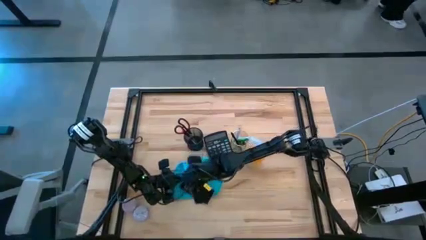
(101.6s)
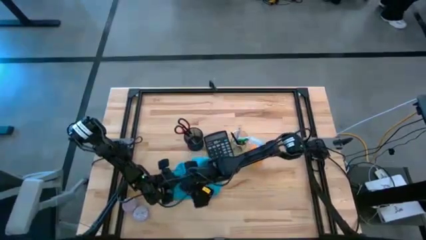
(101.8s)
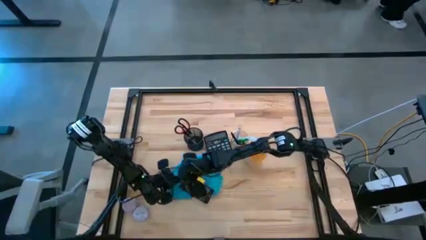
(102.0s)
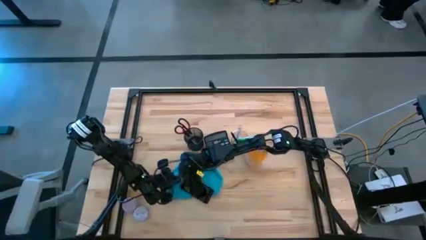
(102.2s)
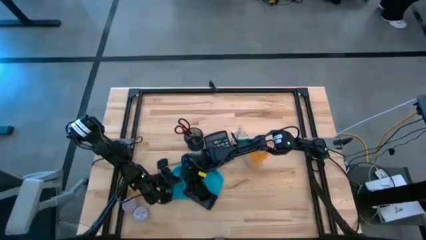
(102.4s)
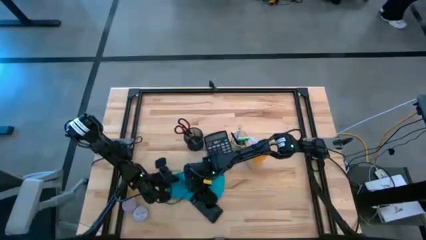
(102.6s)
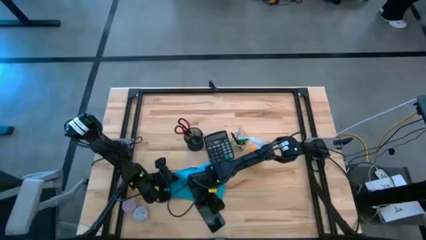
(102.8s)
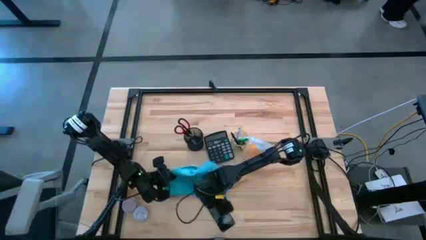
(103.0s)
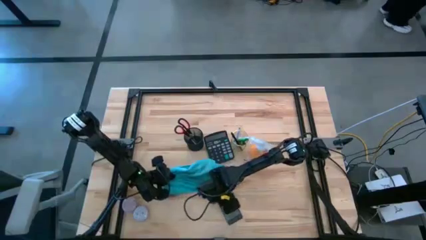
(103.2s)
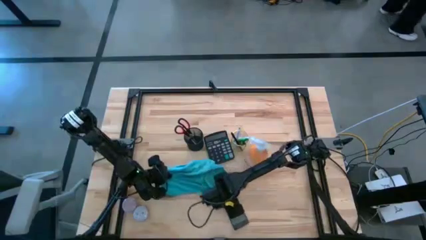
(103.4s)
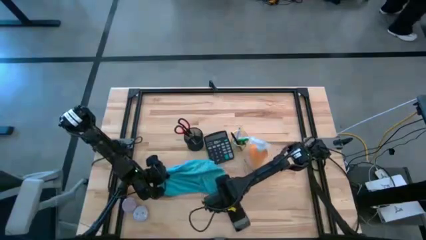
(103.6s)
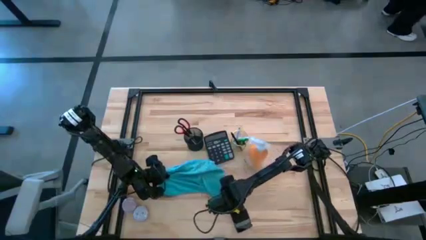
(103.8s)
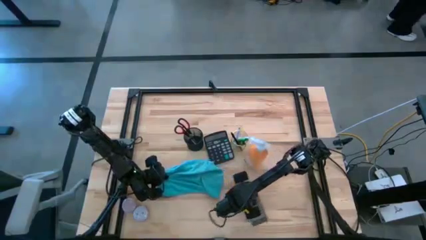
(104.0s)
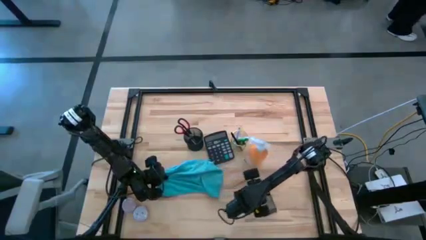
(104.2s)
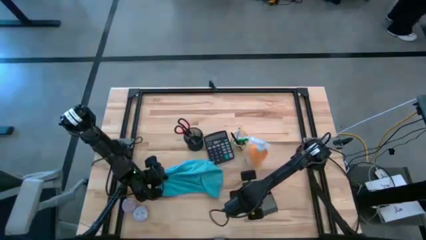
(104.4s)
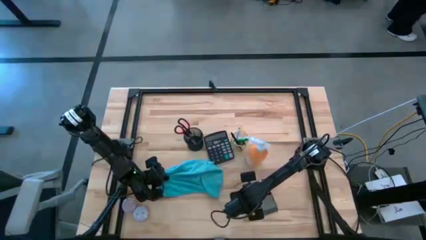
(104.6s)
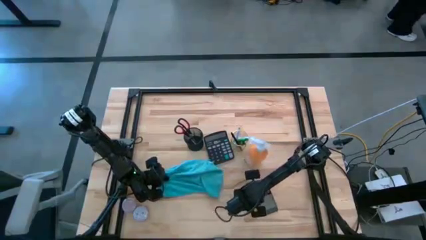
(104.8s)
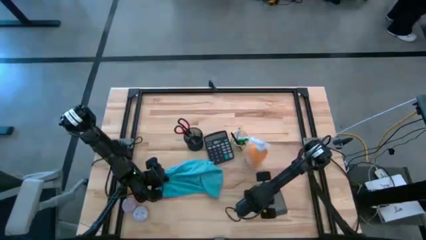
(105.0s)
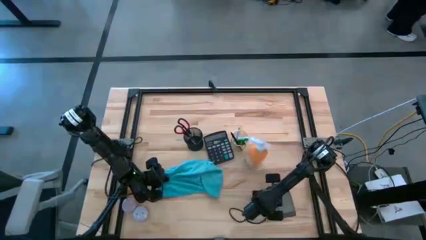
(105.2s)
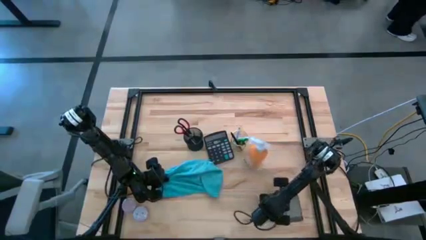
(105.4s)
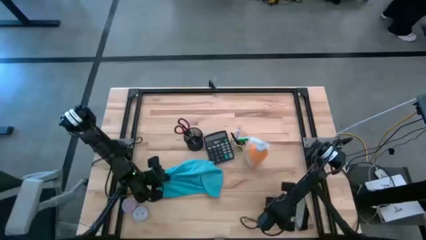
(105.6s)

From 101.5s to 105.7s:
Task: Apply microfiber cloth
Move the cellphone to the bottom right

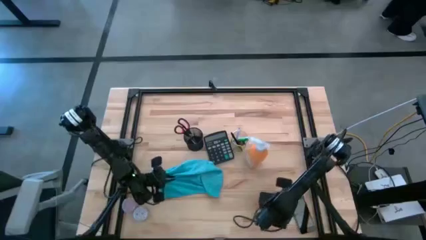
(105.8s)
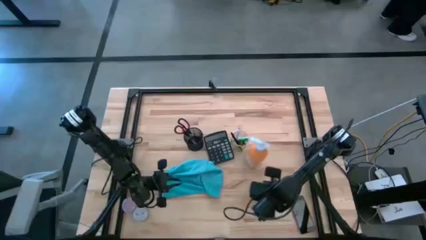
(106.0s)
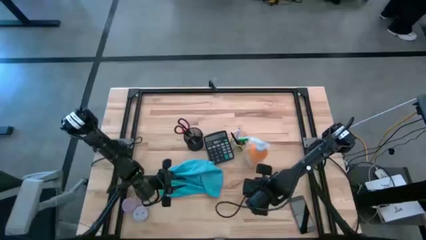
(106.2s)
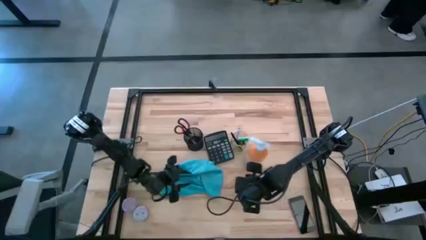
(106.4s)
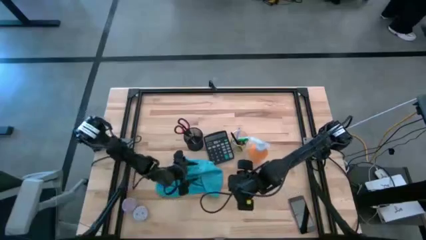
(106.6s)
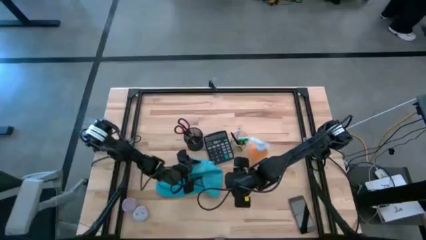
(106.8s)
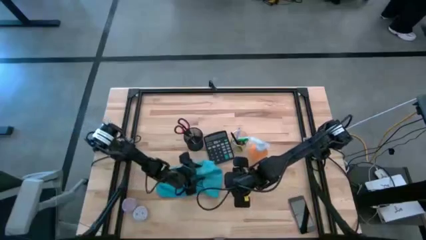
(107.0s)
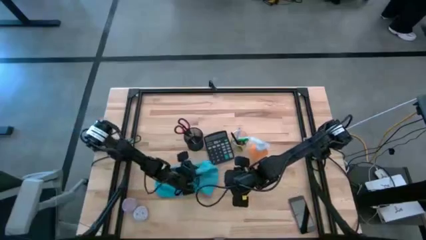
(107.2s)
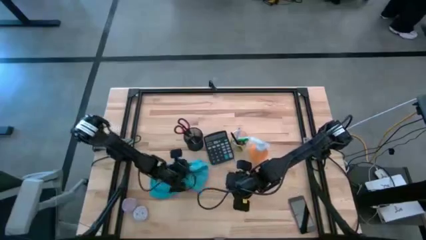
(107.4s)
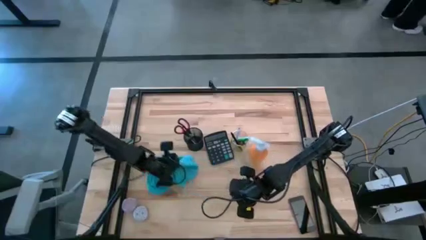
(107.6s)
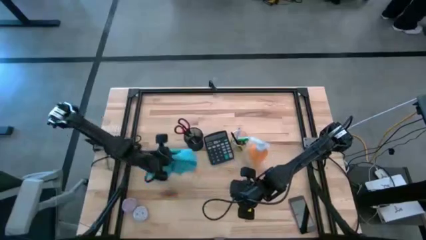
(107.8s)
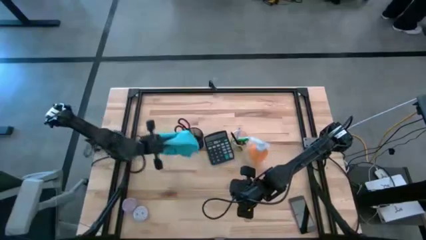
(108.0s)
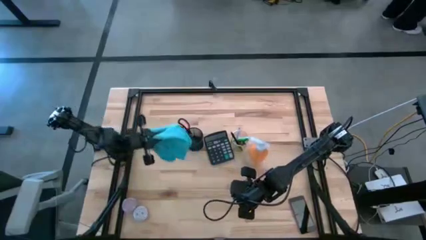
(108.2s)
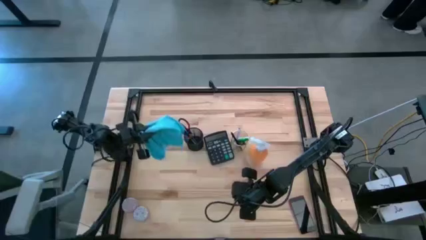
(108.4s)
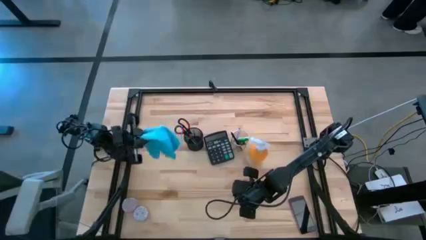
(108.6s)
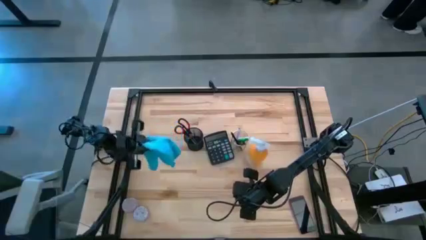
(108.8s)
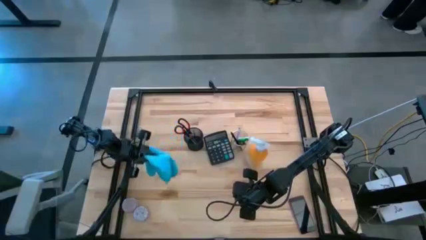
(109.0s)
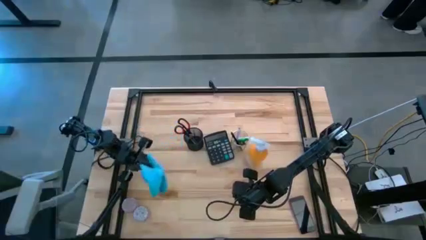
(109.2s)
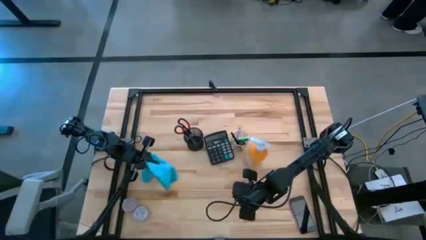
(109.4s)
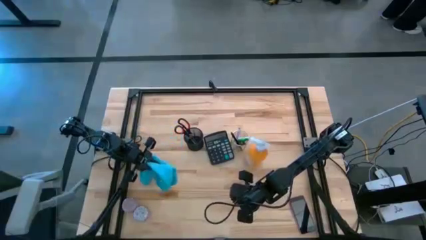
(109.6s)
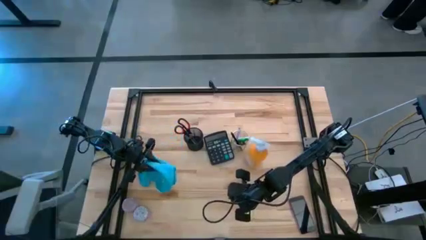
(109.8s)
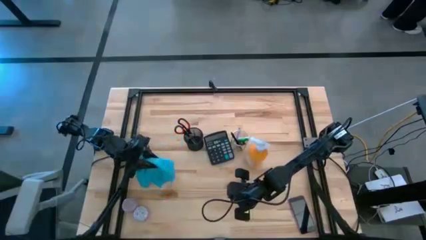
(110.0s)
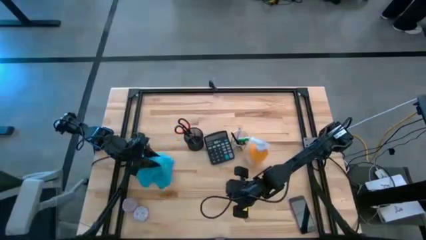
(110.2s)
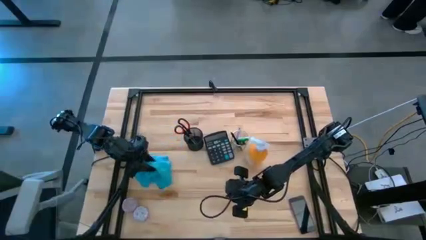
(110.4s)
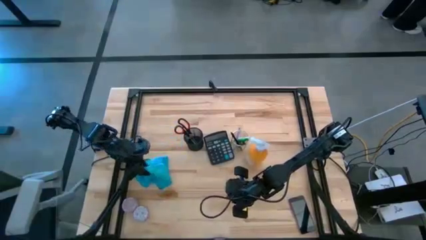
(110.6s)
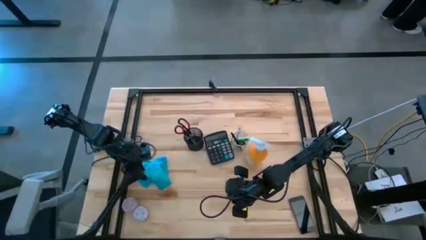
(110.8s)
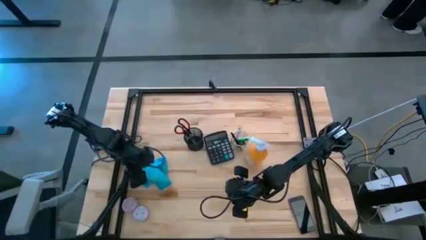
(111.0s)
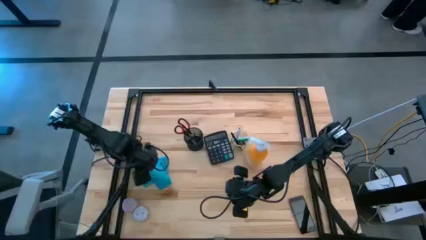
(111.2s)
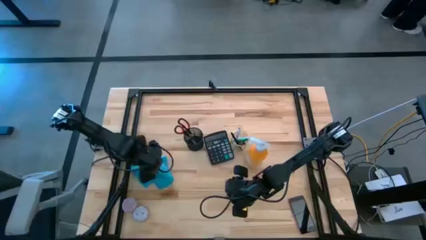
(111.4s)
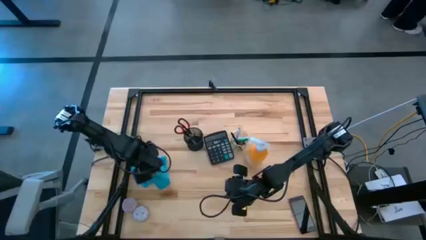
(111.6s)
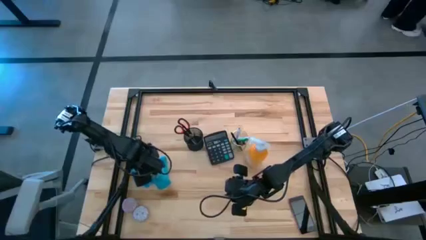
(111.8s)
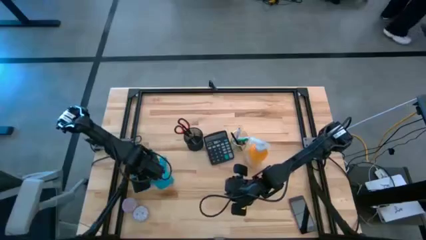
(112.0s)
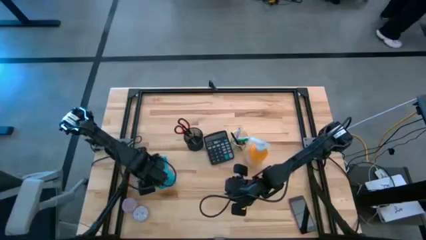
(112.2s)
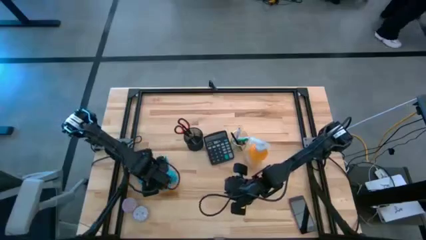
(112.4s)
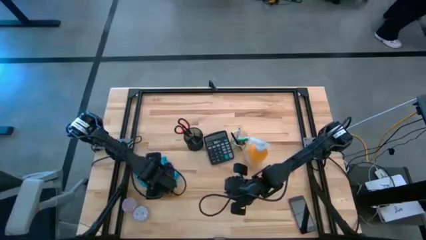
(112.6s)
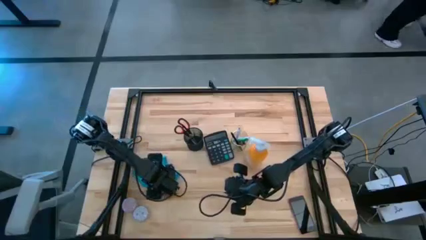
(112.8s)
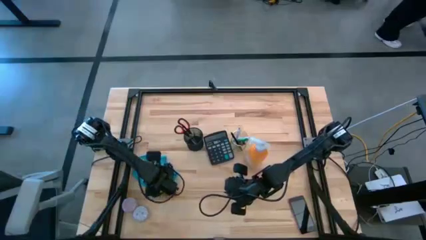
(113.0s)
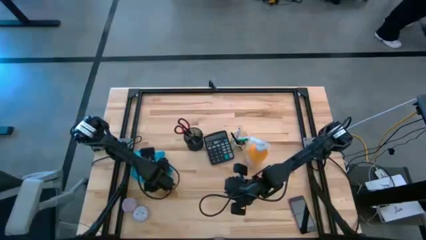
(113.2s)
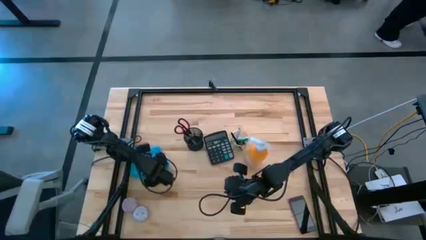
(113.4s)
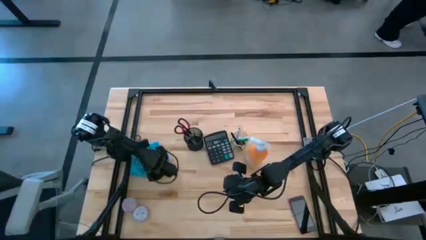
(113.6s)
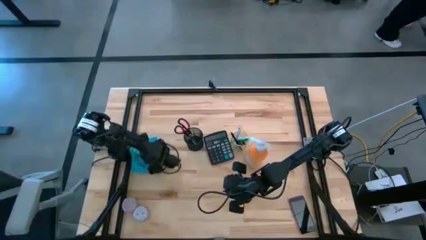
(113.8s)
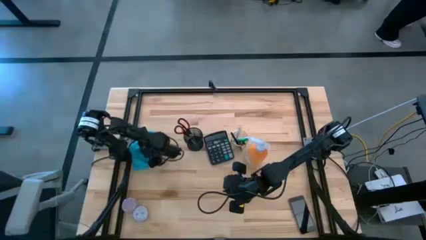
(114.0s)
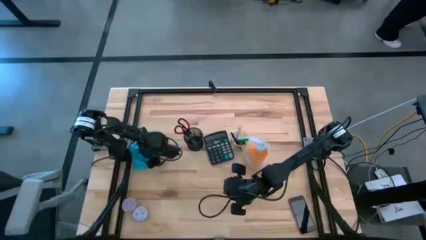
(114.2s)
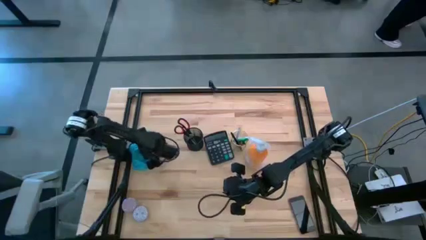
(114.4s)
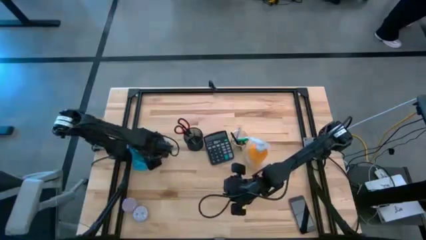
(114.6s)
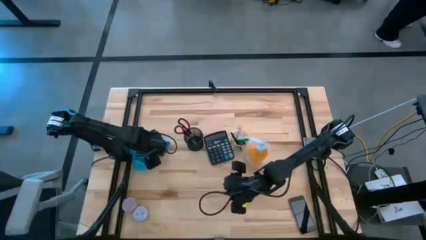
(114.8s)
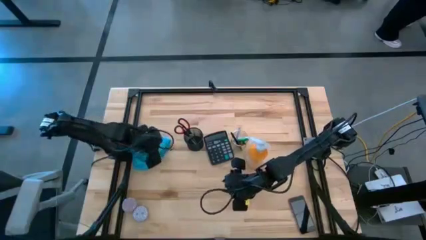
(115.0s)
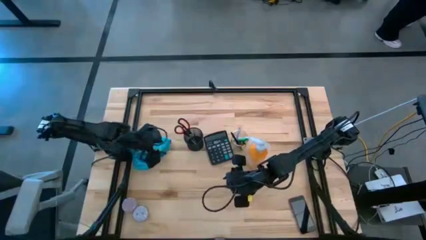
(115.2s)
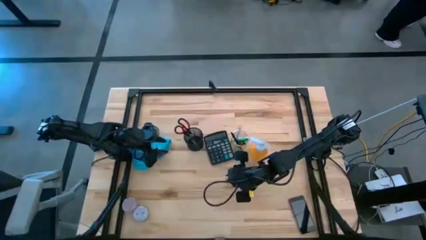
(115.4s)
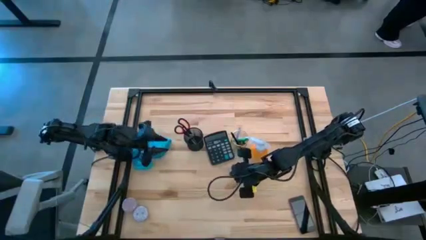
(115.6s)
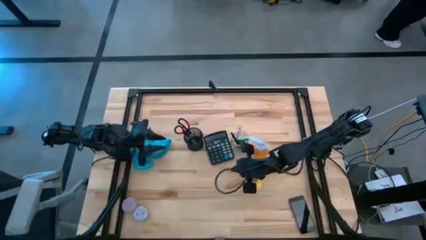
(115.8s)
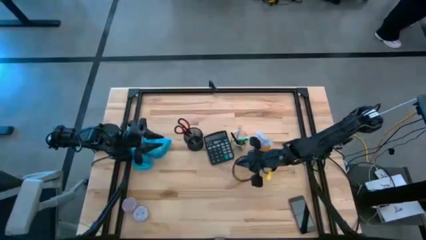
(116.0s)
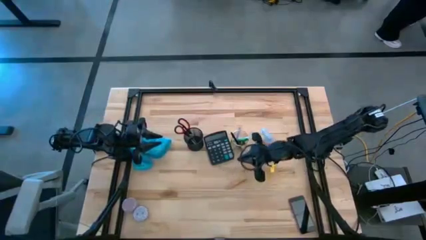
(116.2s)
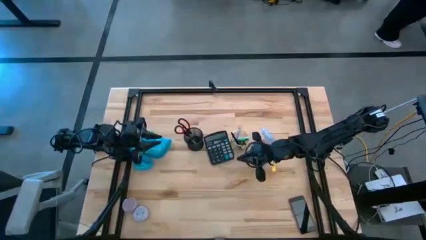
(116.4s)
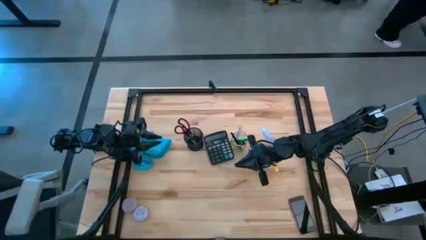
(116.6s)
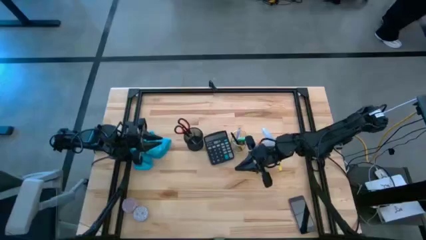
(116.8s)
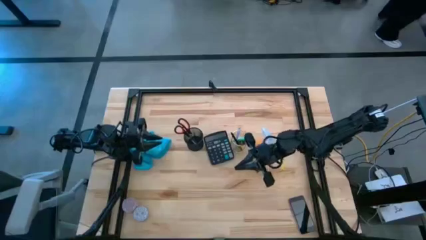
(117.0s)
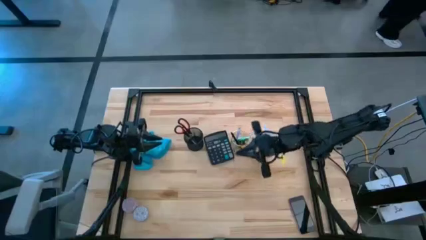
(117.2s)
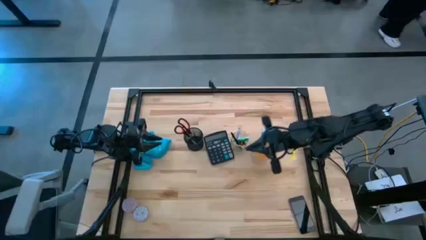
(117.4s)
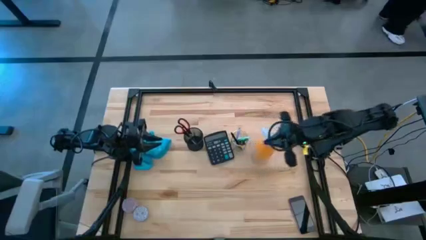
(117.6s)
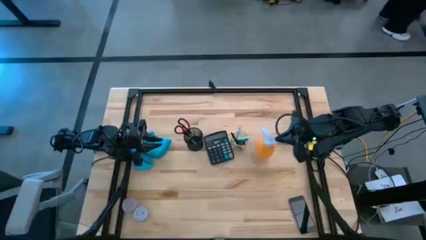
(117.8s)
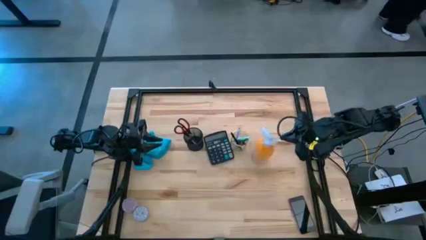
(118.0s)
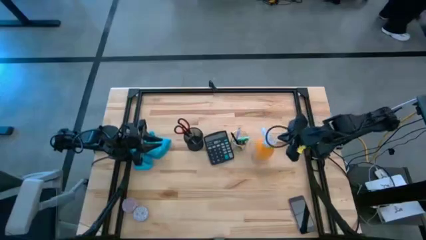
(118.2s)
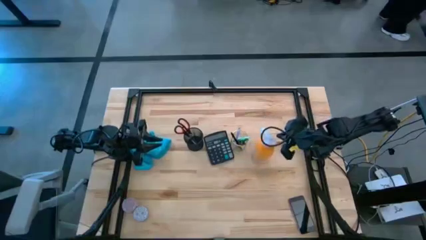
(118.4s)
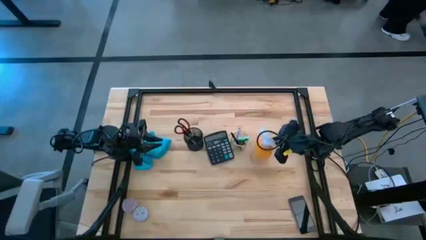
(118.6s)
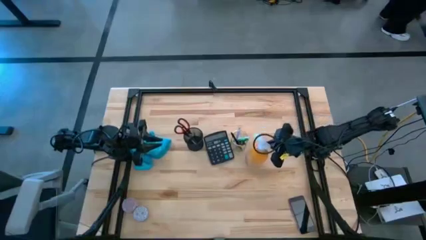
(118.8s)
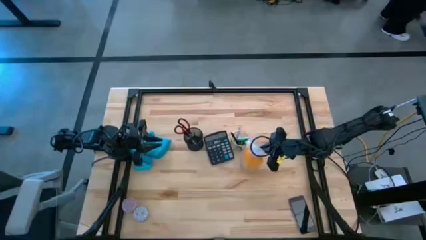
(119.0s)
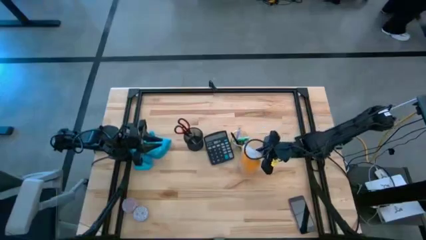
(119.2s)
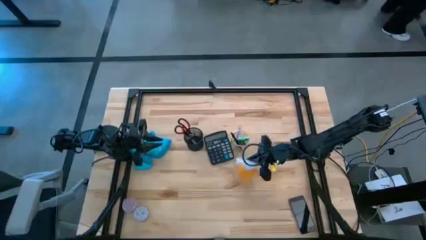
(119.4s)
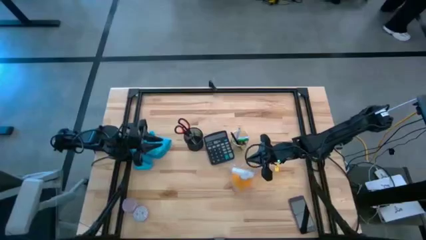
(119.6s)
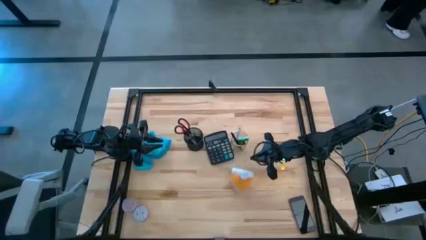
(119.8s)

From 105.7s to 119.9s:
Move the blue microfiber cloth to the middle left
